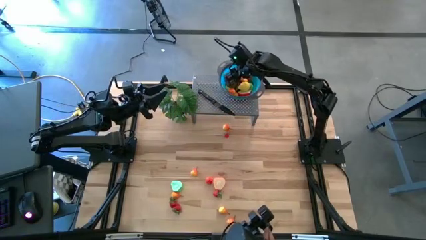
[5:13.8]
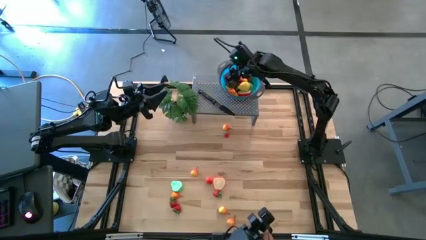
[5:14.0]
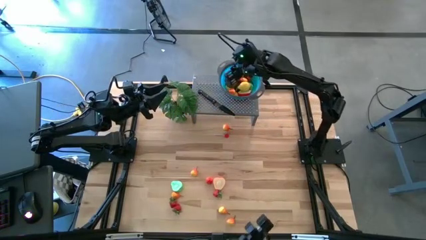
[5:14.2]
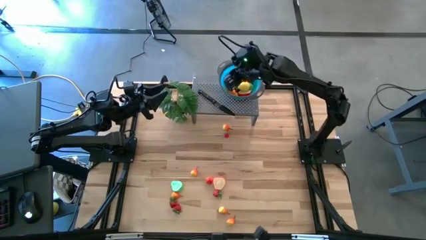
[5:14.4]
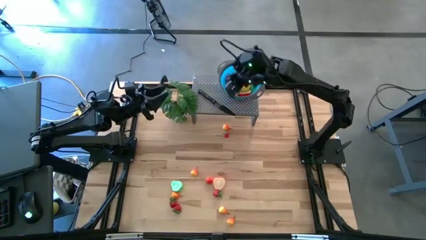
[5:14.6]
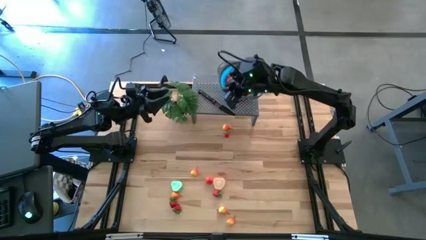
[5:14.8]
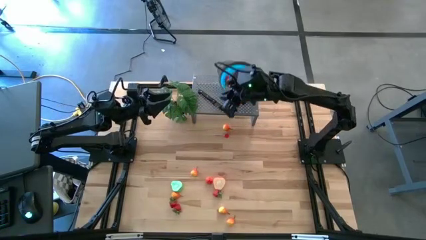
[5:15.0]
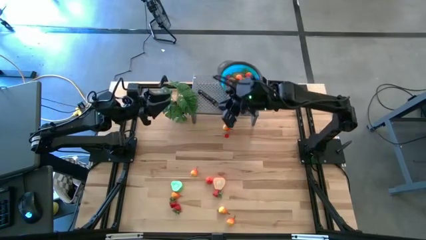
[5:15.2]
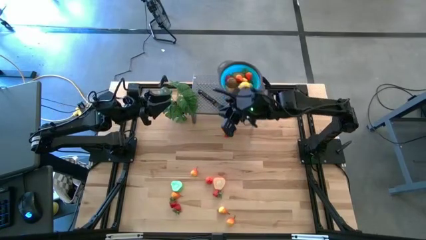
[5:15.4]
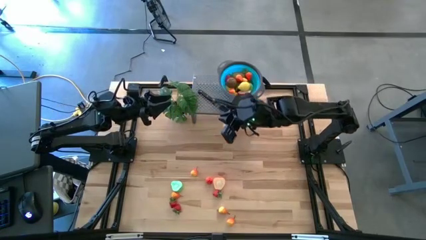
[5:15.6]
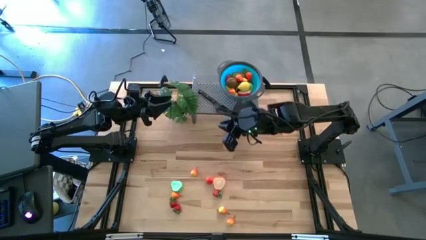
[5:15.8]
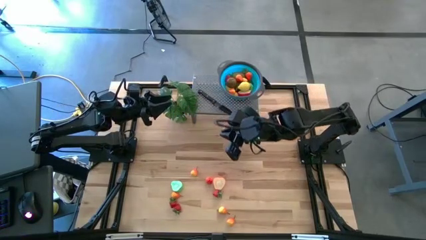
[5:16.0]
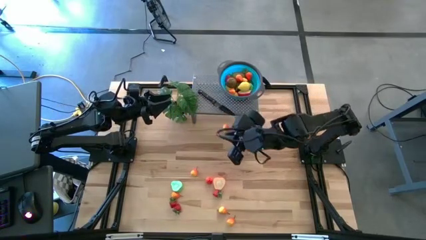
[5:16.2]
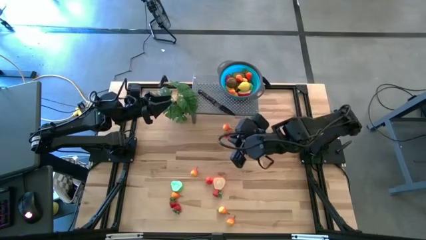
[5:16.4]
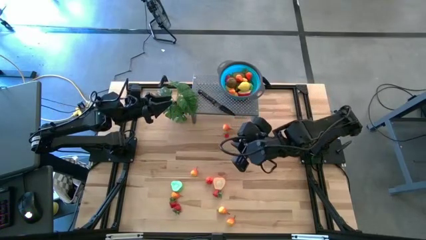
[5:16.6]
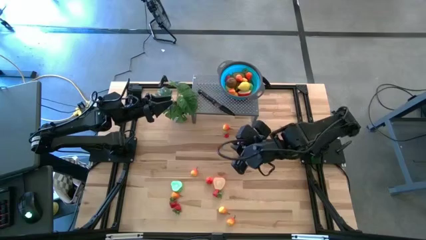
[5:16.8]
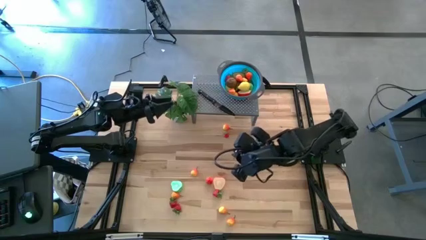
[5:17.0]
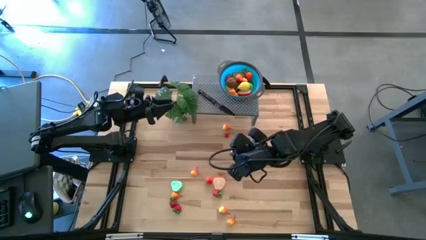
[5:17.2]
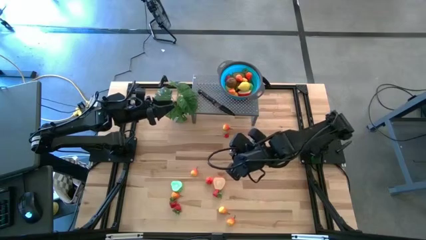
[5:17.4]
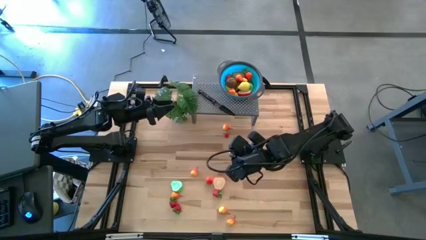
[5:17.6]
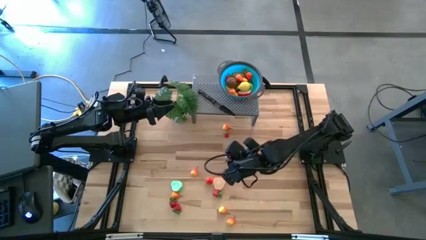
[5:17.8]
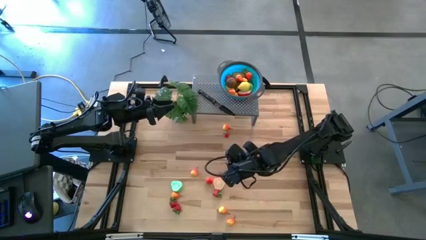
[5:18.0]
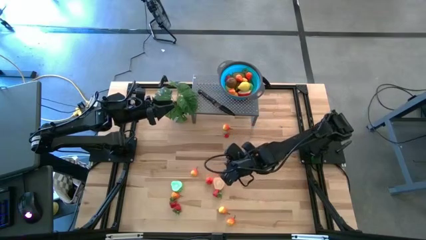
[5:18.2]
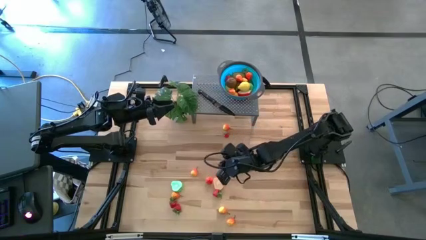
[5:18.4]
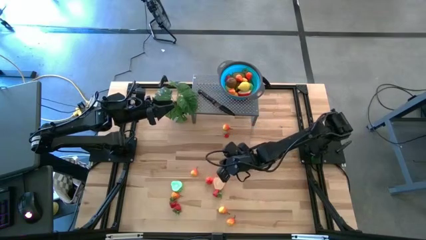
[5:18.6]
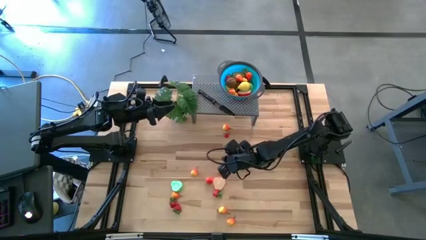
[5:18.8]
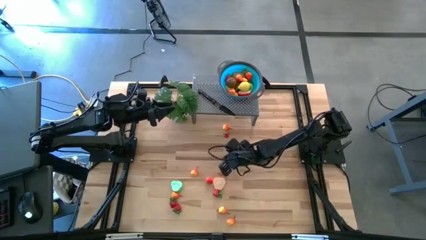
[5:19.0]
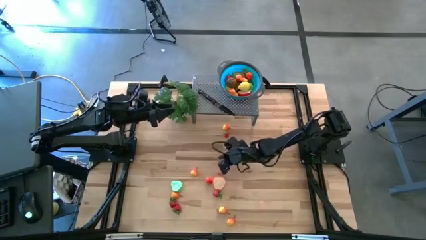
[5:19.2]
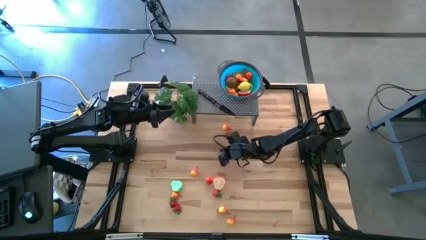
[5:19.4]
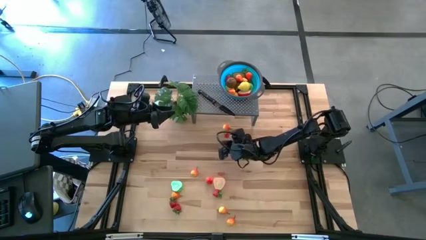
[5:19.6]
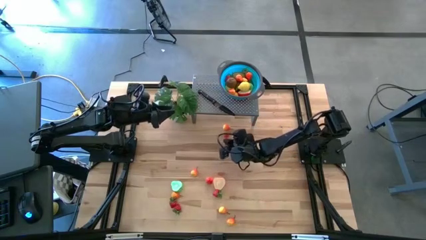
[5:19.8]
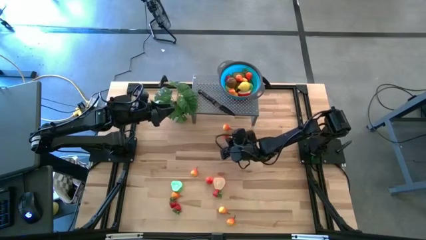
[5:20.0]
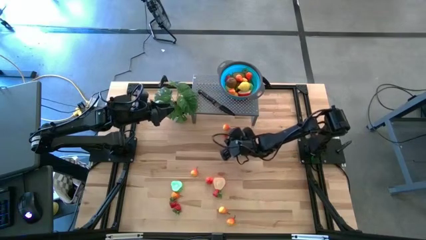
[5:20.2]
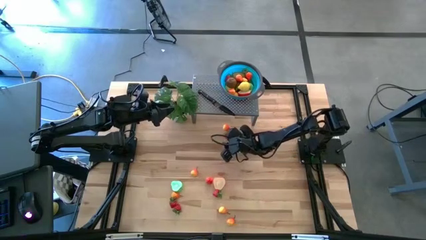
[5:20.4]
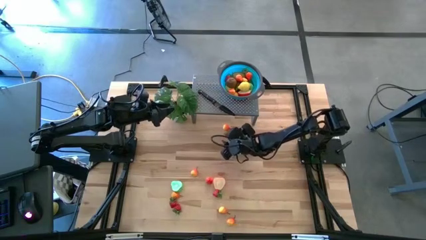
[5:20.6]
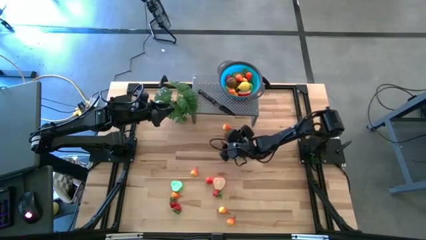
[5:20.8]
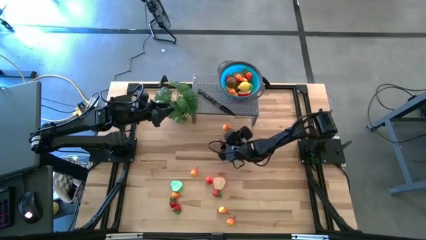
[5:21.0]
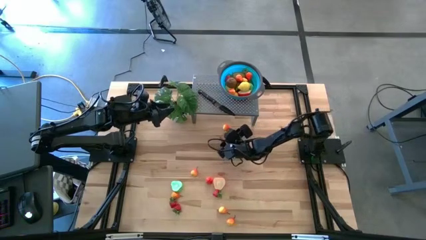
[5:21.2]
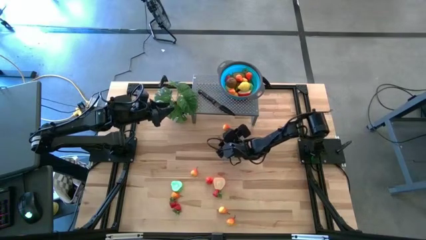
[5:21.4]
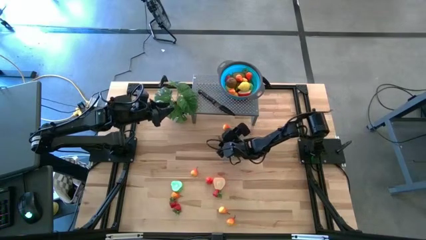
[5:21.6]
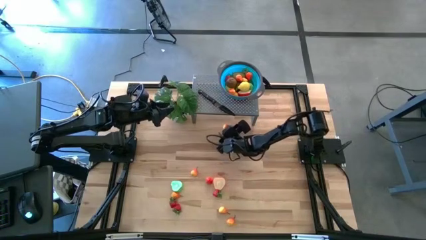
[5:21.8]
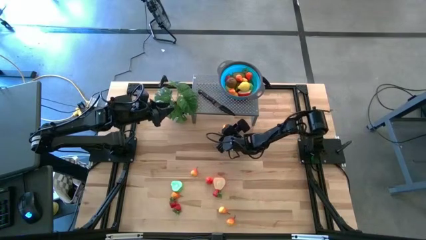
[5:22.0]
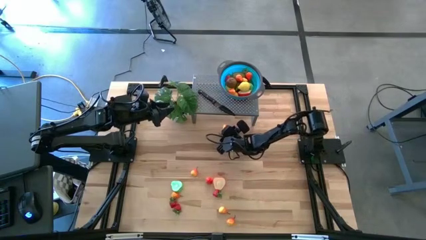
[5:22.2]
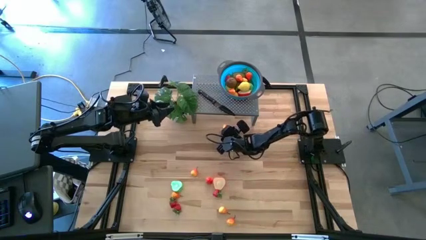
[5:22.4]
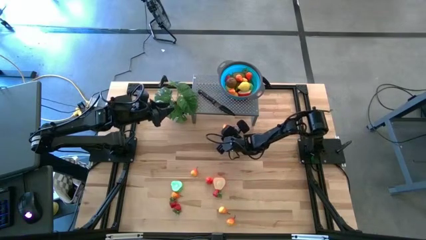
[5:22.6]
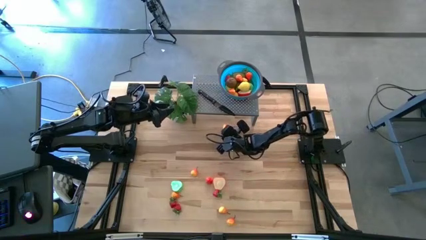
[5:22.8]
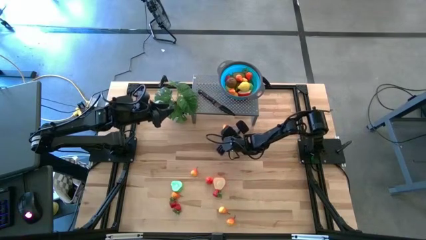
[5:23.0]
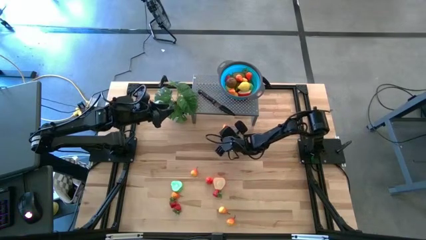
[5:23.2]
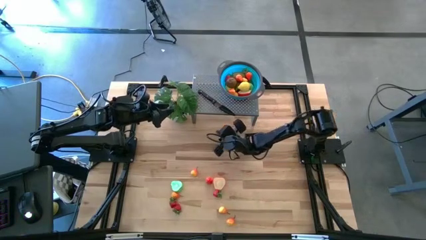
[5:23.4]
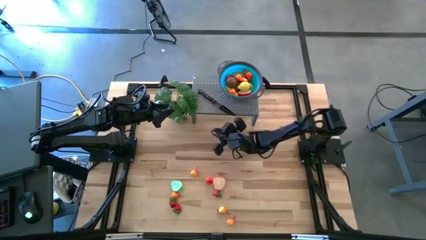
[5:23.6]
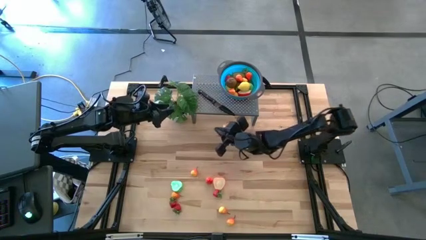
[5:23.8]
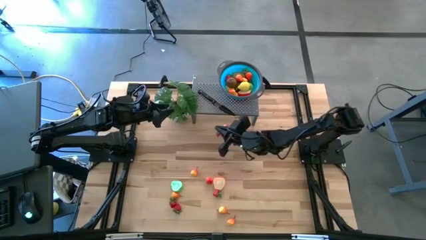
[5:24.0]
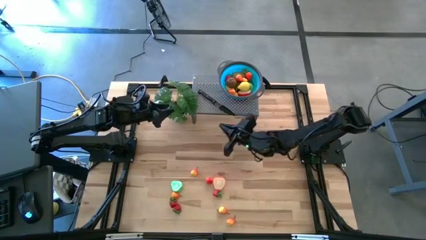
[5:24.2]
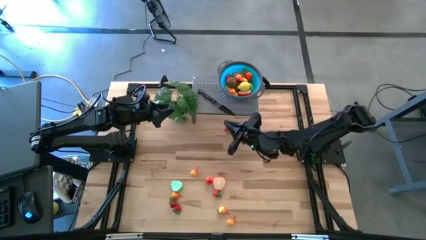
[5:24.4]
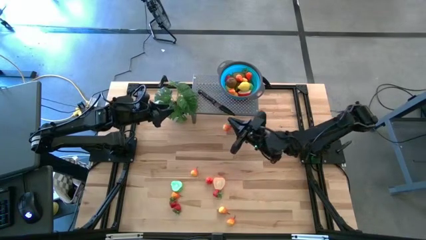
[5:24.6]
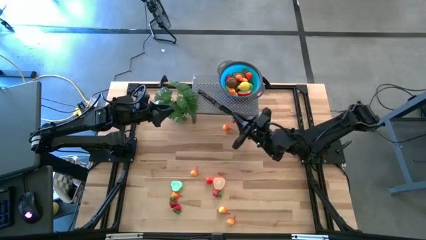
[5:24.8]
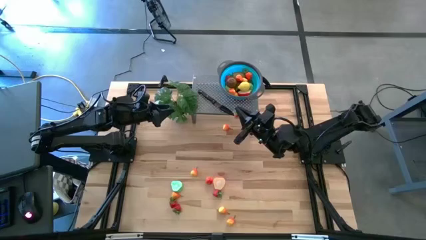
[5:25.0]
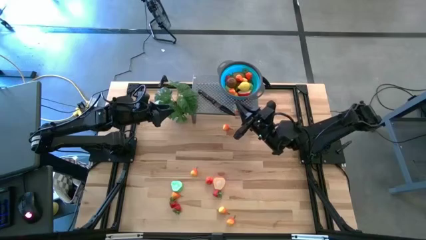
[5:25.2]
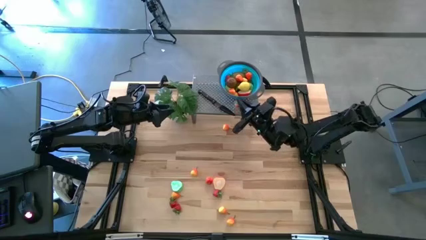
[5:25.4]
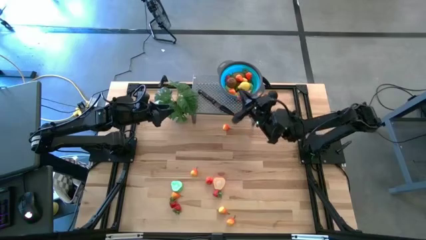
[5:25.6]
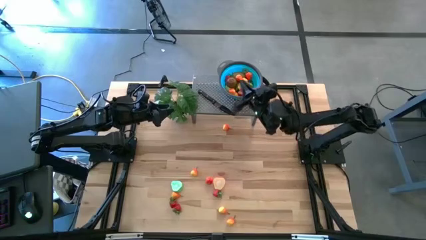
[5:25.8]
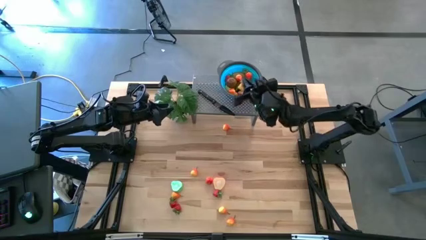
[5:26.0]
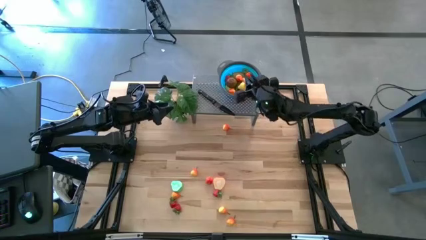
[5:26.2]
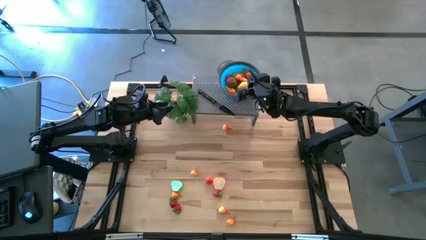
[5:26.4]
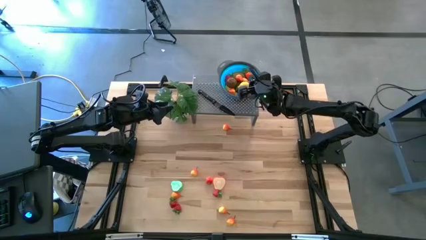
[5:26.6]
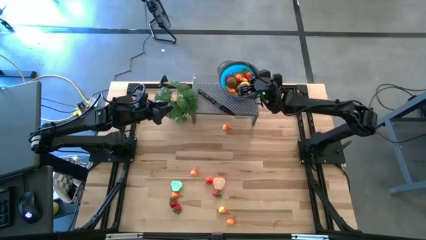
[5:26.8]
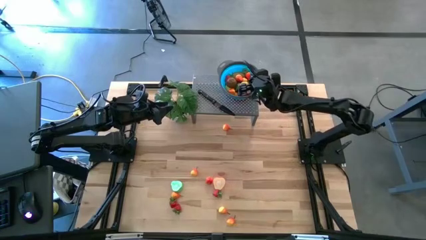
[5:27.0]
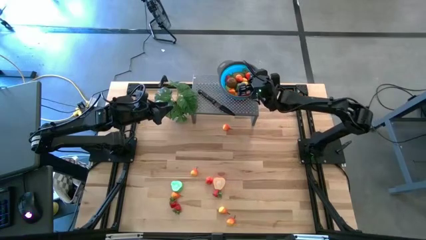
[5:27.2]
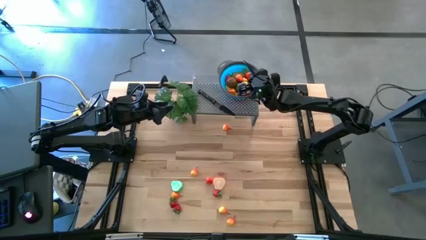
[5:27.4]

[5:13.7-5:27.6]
Task: Pick & Place Fruit
Put the red strawberry in the blue bowl on the shelf

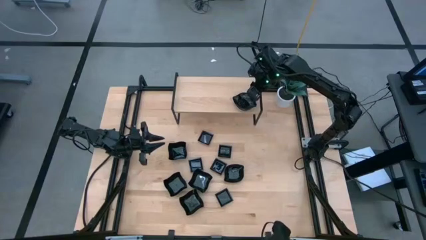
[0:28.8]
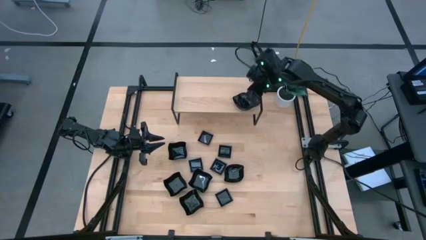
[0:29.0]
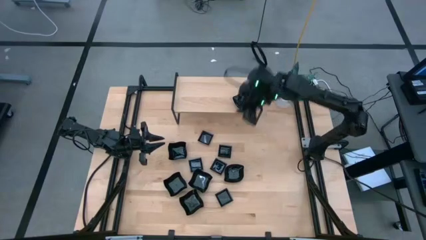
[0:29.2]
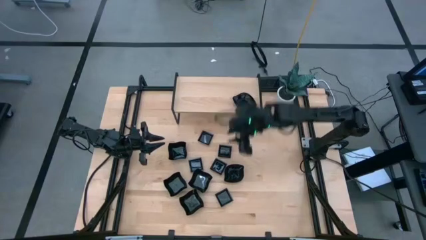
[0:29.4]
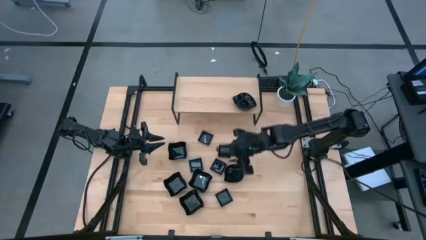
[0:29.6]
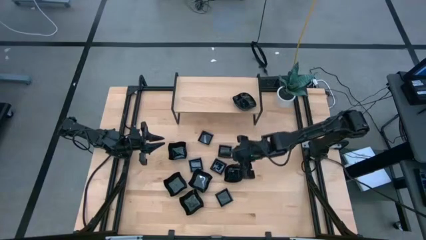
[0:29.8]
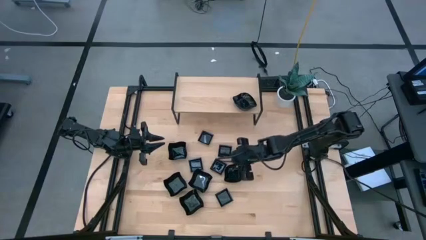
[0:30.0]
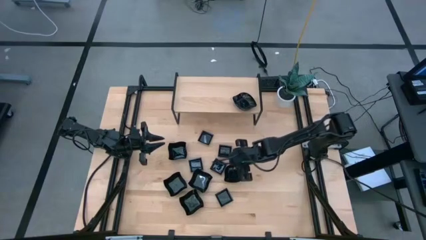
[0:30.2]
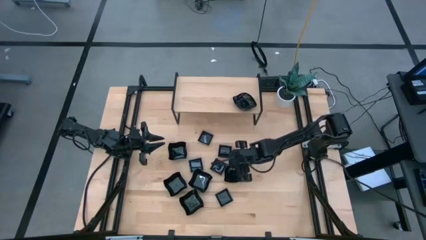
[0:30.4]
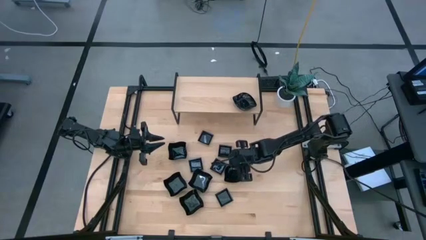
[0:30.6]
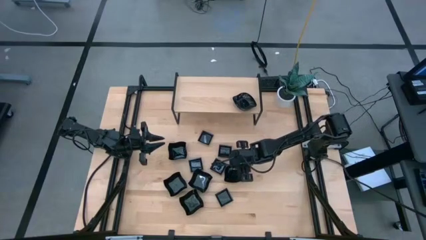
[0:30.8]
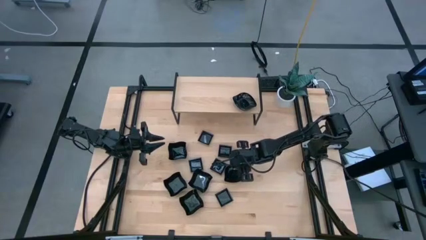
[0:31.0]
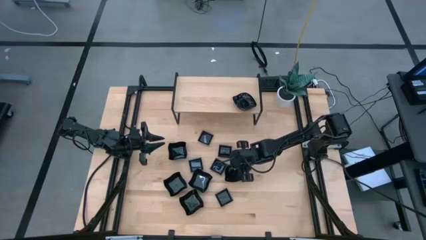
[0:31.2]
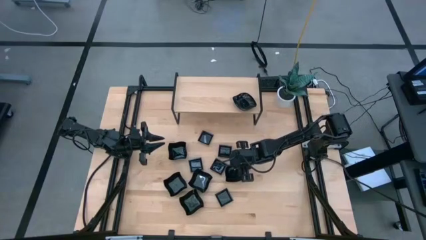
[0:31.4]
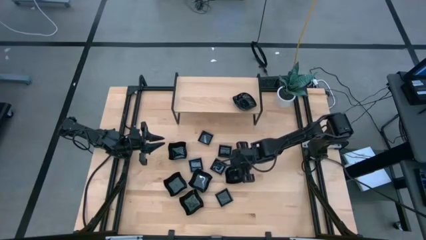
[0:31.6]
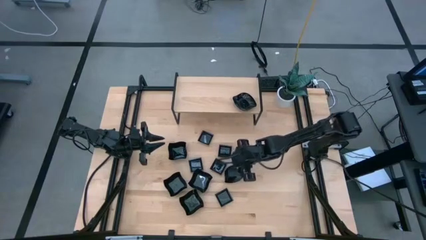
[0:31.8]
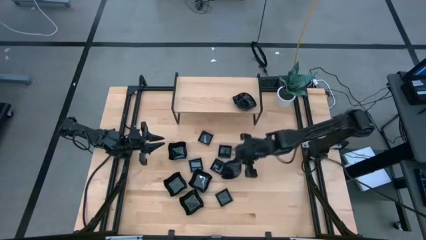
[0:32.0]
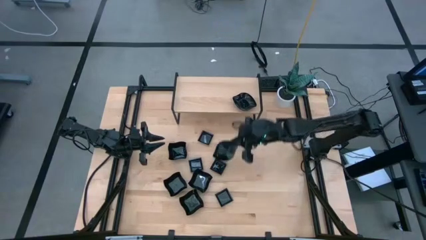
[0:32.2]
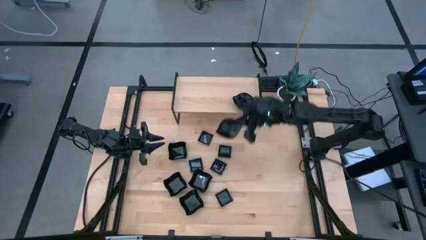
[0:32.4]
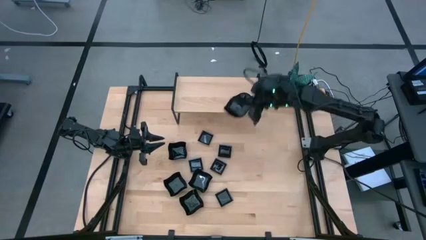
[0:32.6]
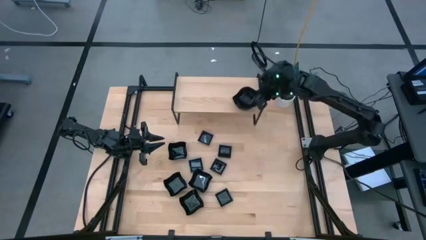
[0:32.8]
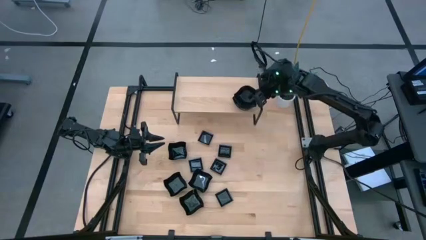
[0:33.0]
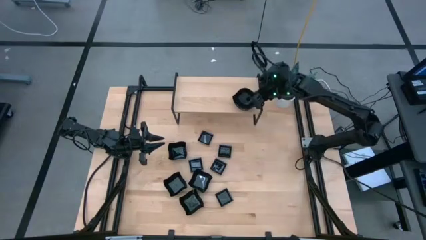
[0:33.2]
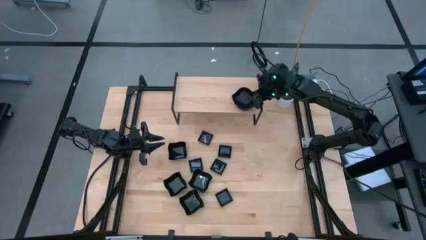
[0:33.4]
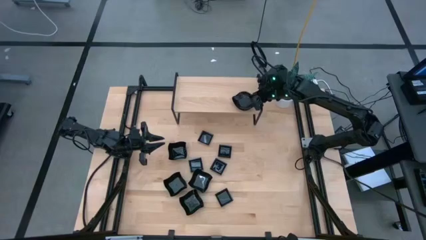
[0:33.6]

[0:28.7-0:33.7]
Task: Pick & Place Mini shaped plates
Stack the leaf-shaped plate on top of the leaf-shaped plates on the shelf
